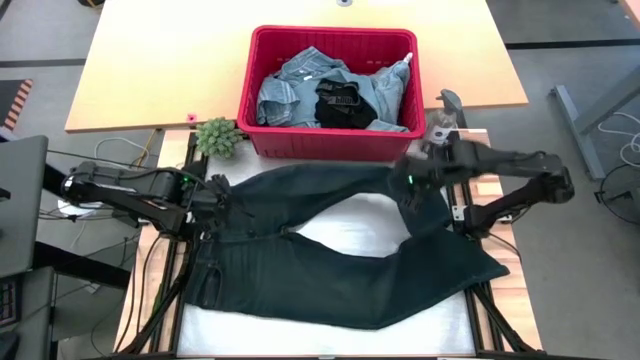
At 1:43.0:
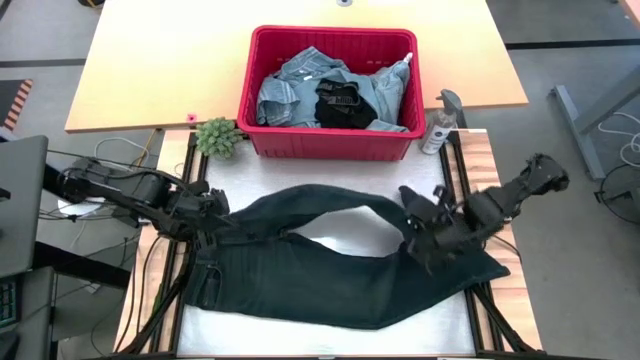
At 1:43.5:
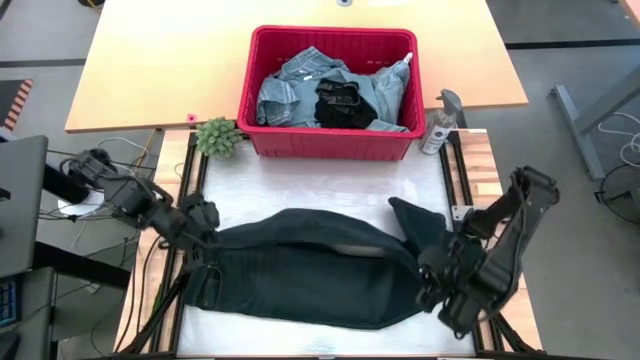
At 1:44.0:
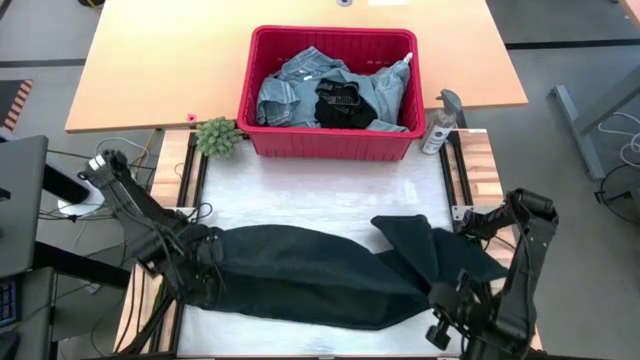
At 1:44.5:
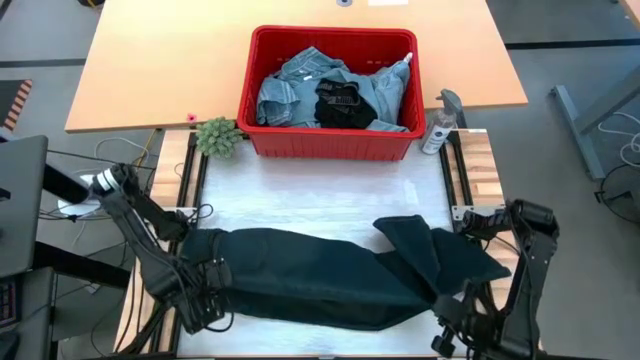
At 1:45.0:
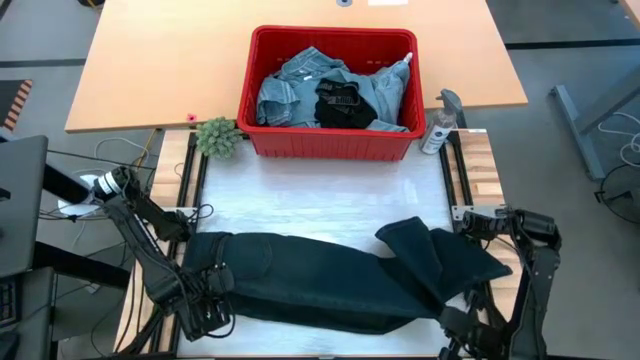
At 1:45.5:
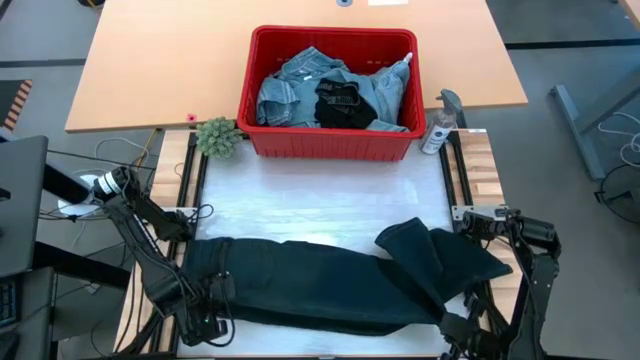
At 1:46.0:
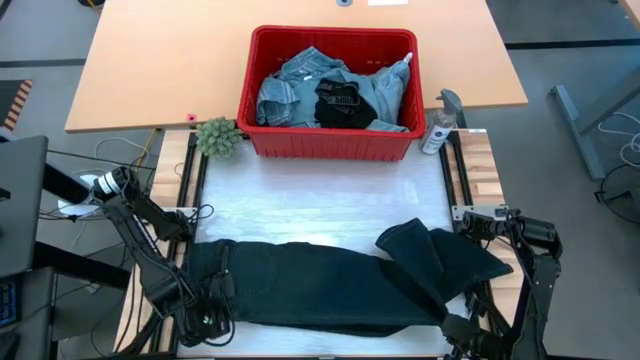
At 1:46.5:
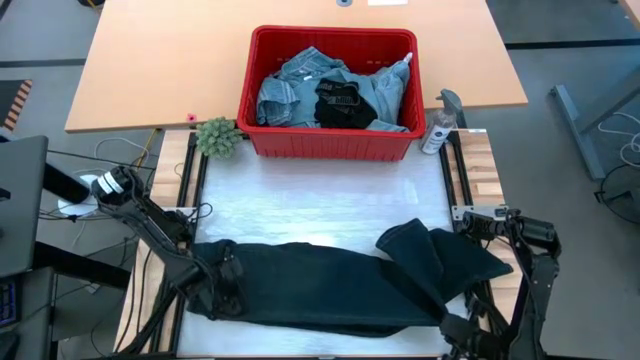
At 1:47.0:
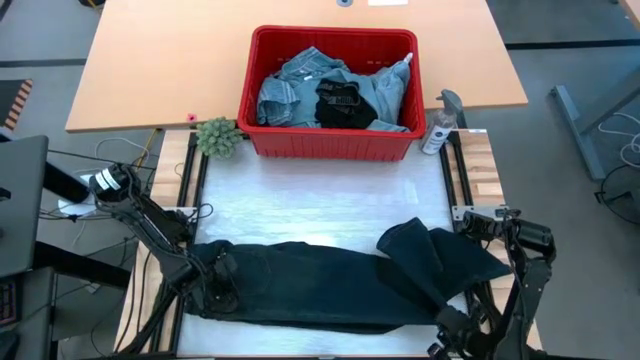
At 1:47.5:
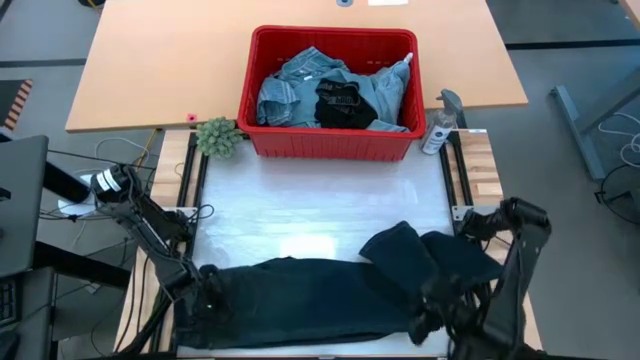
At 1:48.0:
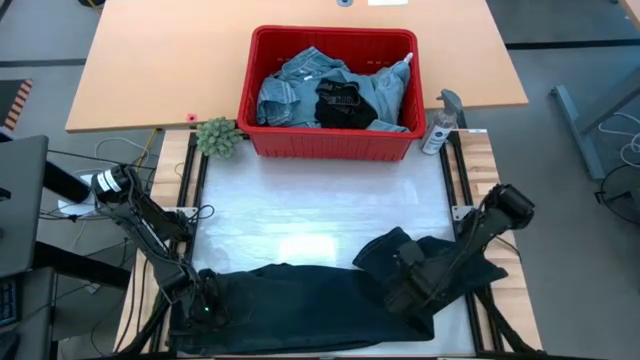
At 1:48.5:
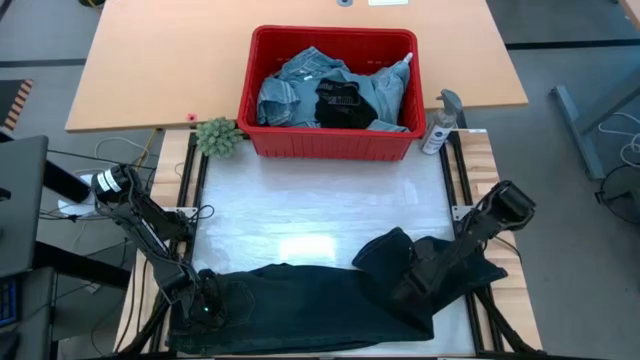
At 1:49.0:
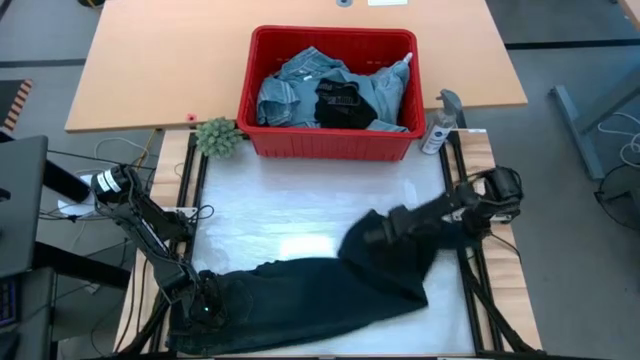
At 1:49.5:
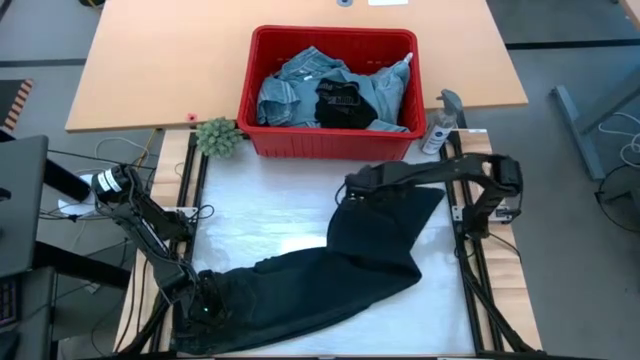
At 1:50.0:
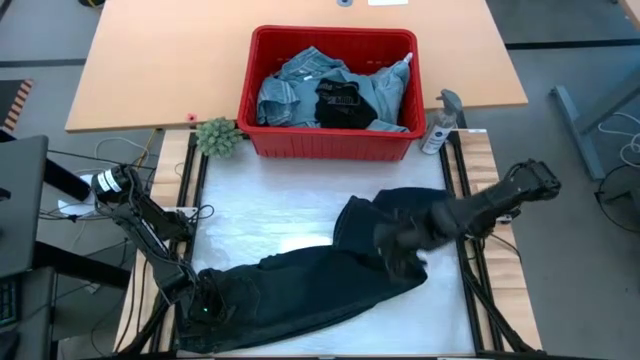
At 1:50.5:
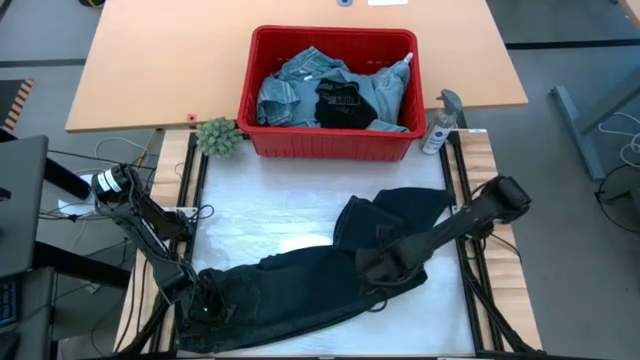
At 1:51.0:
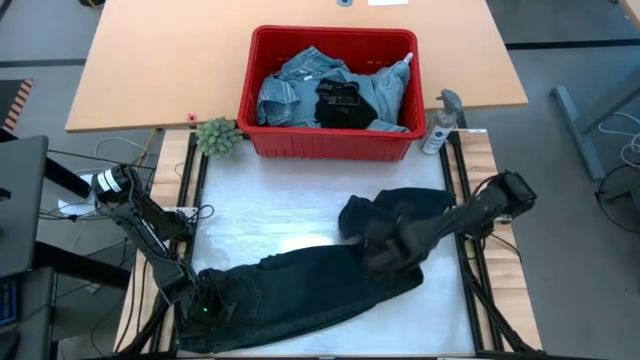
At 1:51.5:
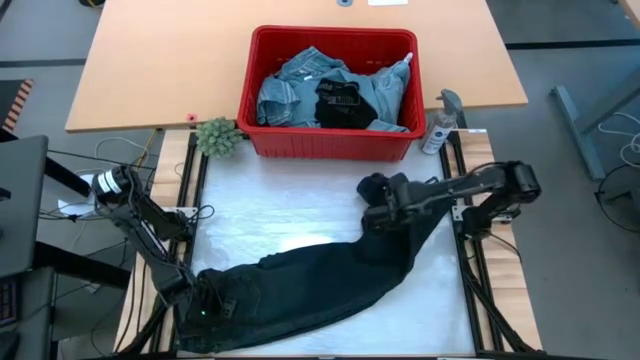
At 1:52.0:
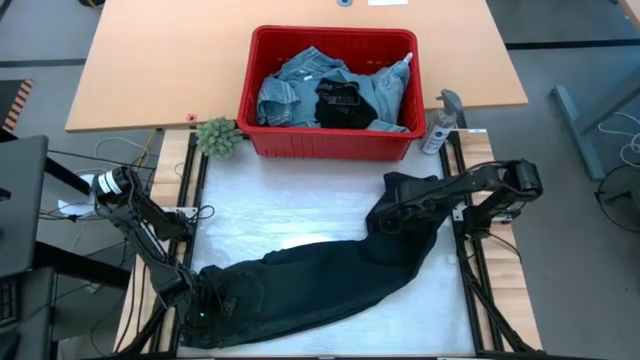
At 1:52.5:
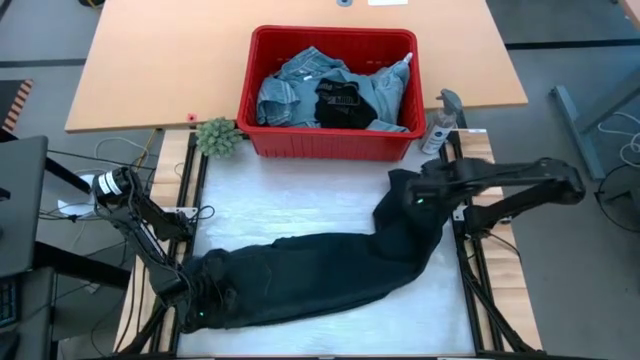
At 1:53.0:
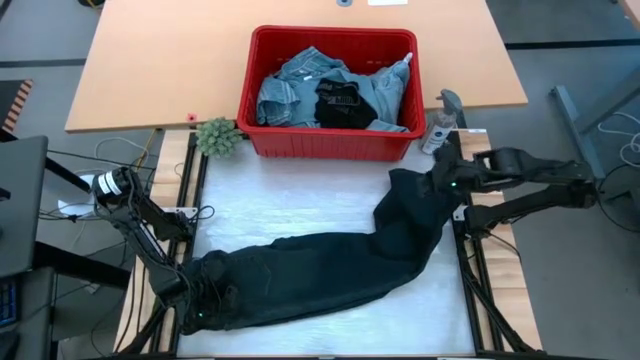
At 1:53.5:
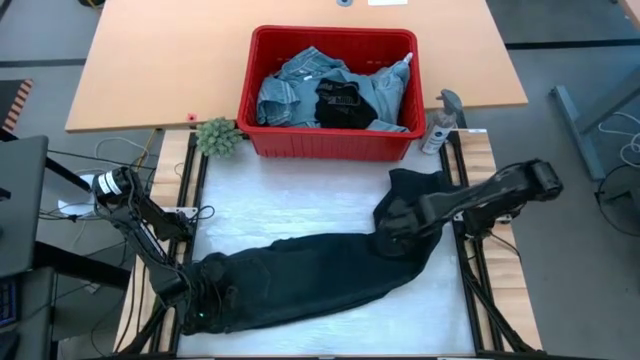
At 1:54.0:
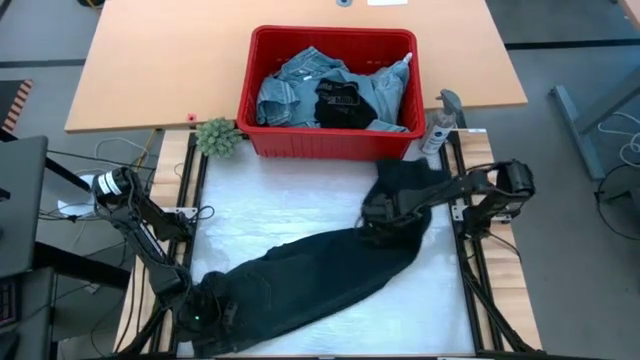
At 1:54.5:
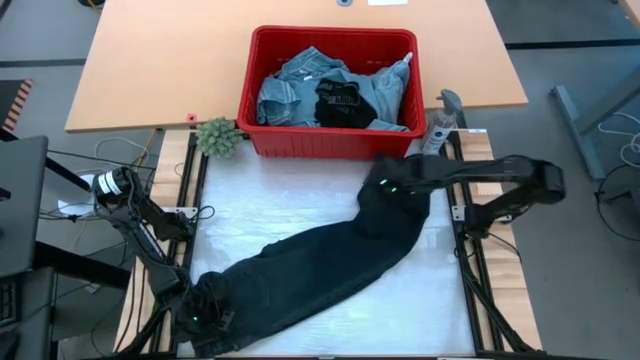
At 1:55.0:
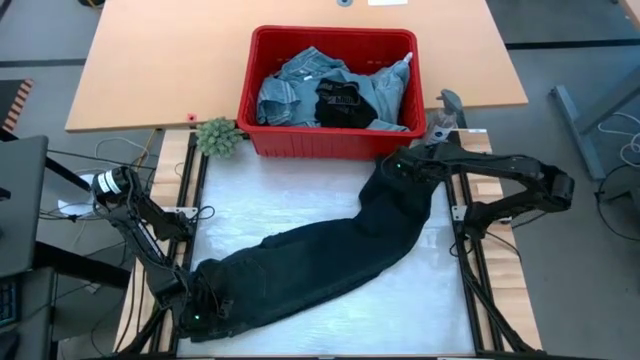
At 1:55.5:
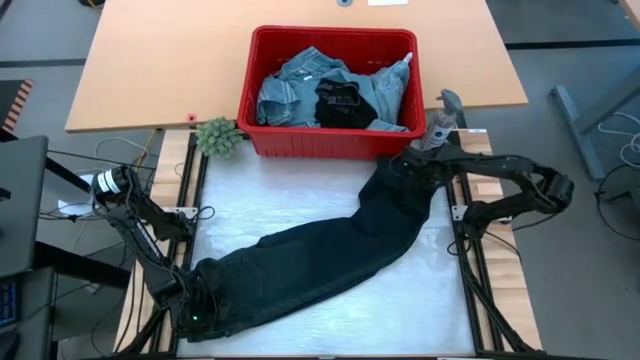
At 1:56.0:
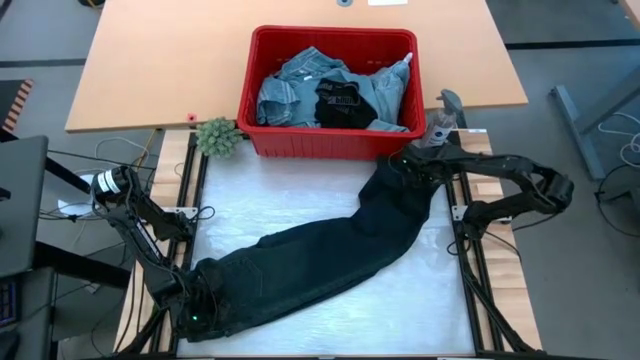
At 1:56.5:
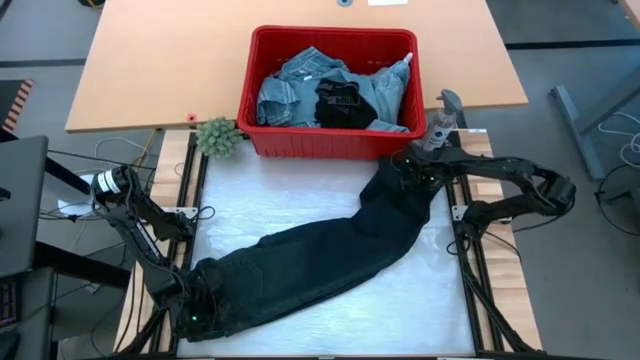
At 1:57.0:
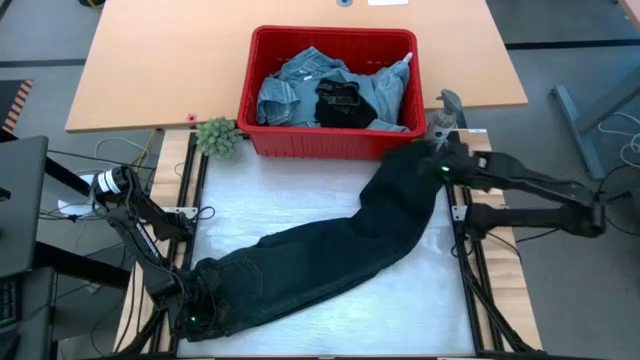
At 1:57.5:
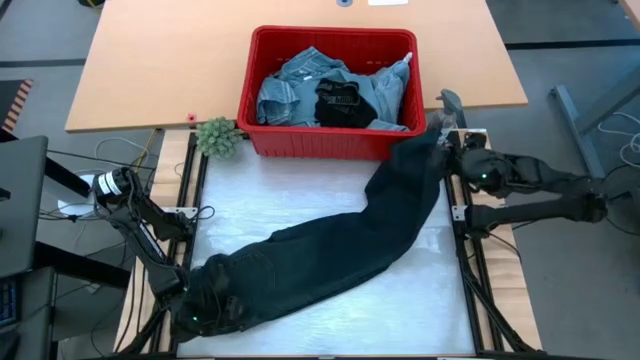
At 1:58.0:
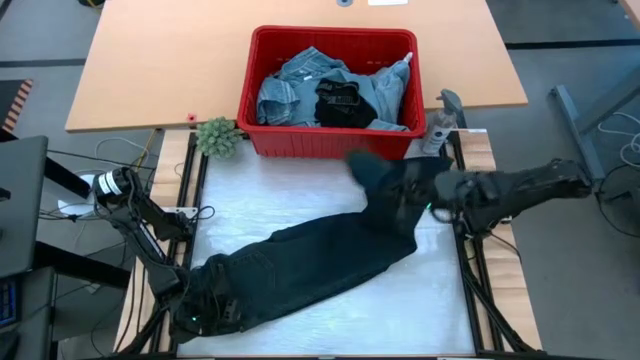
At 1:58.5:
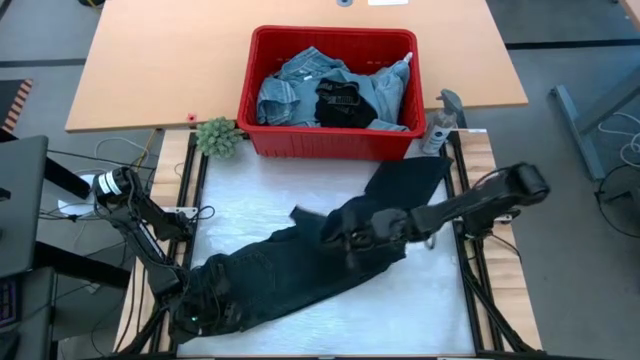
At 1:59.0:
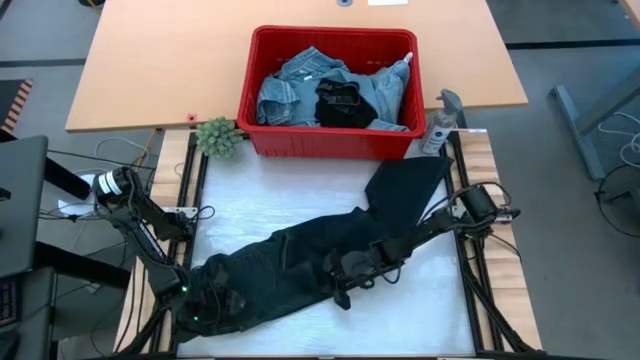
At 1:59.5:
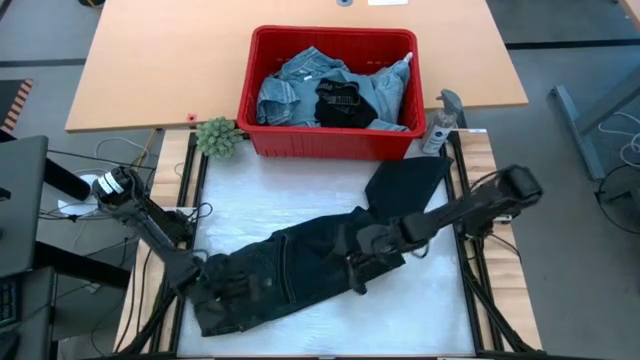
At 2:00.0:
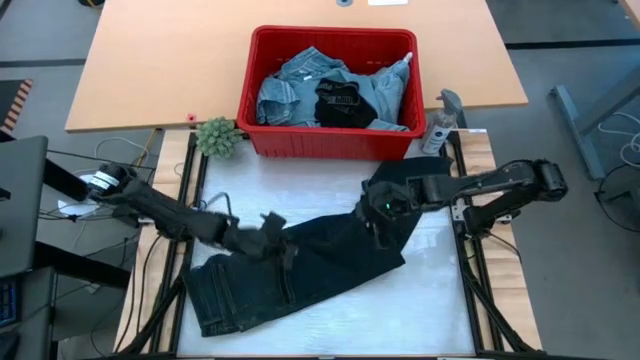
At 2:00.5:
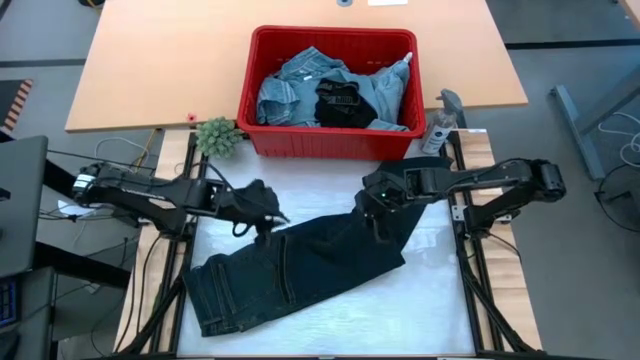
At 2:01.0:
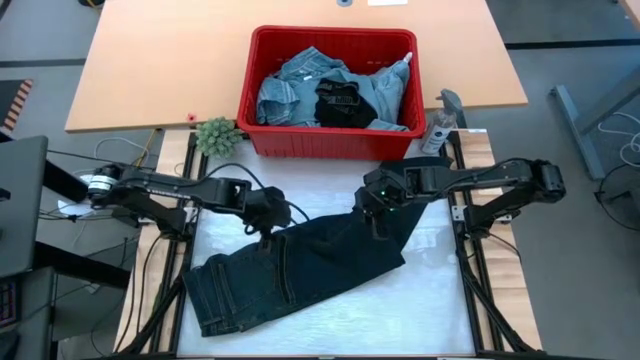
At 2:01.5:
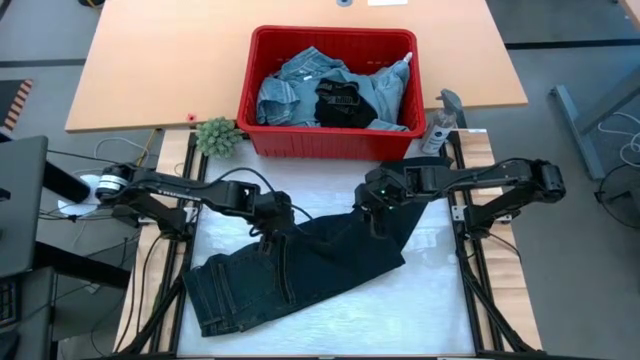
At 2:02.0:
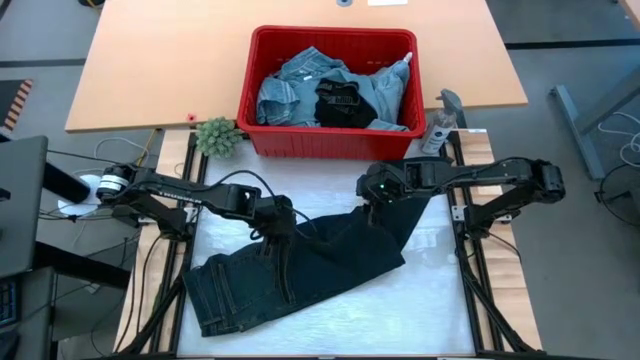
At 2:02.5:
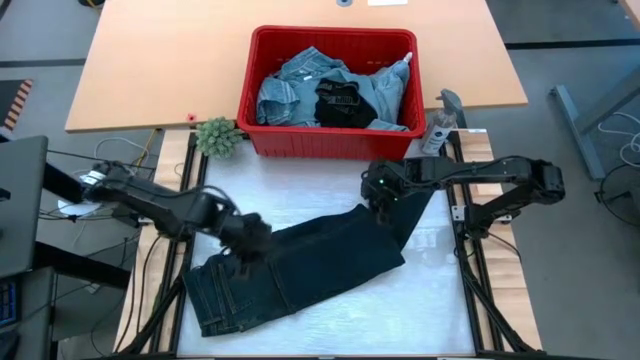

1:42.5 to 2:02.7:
Task: Fold Laundry from Bin
Fold the black pants

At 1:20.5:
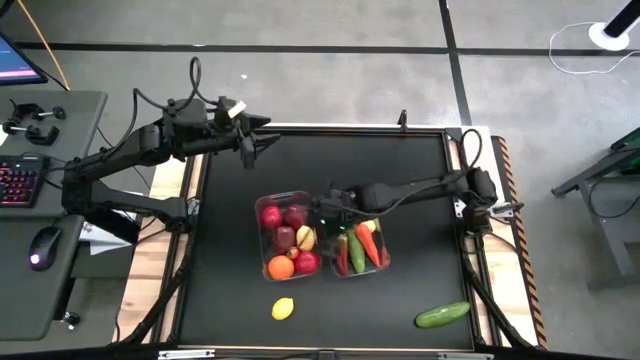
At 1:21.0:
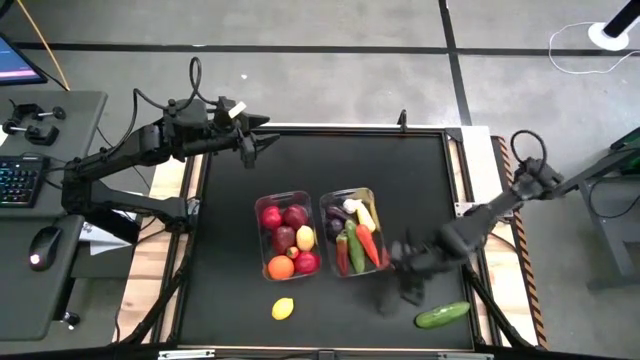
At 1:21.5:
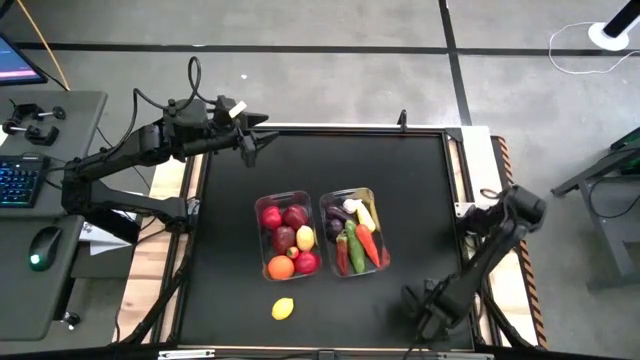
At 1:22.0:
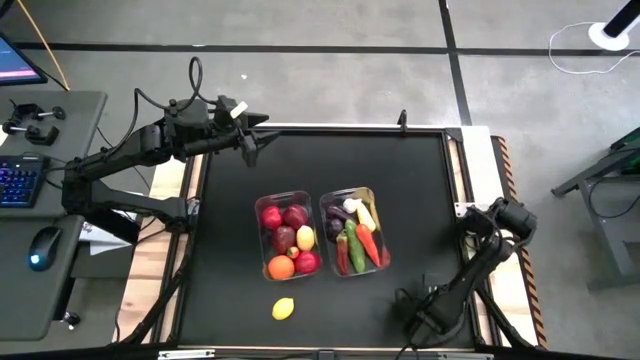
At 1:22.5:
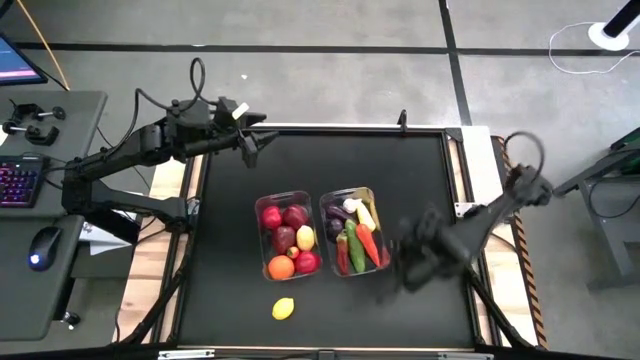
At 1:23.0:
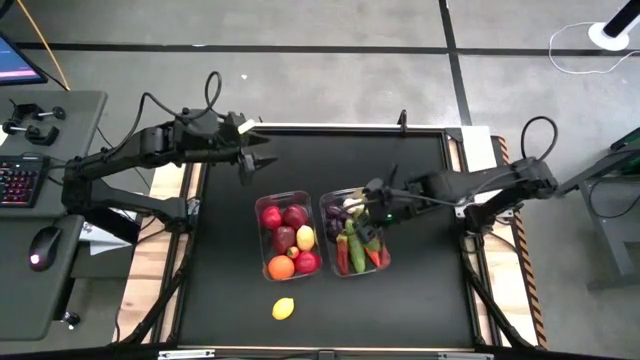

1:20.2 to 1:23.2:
Task: Sort produce into baskets
Put the cucumber into the right transparent bin
